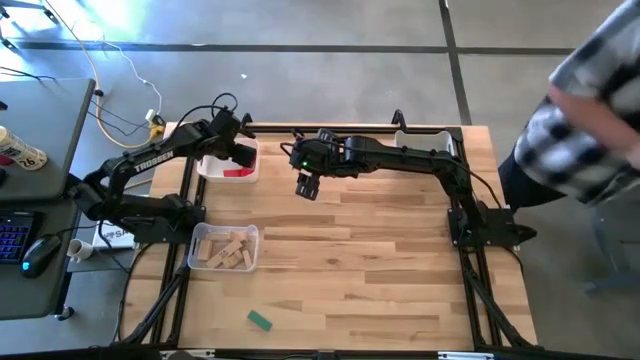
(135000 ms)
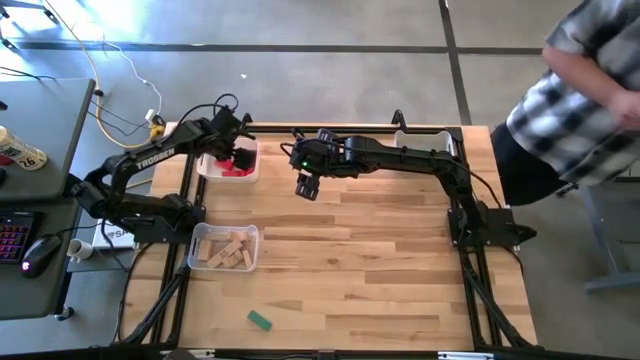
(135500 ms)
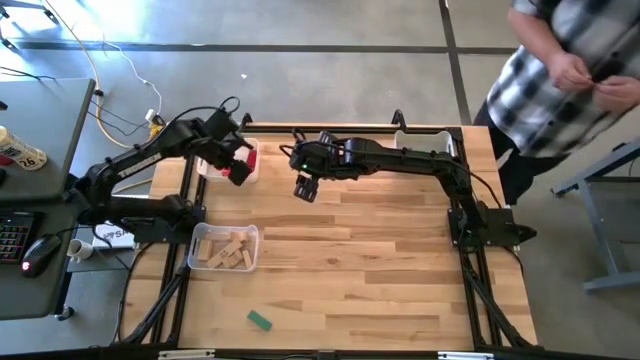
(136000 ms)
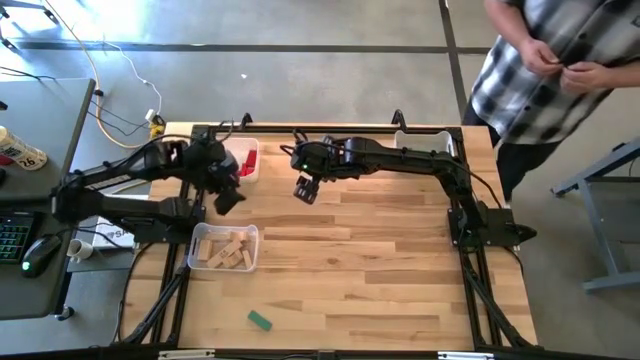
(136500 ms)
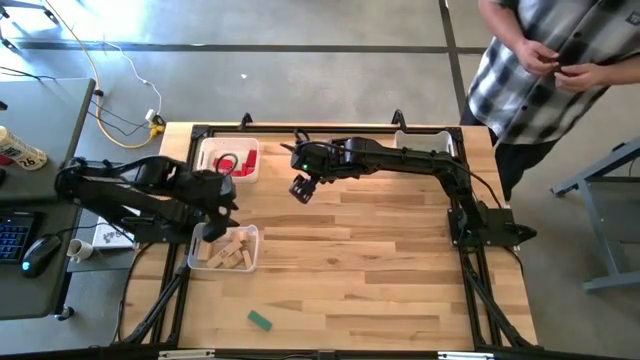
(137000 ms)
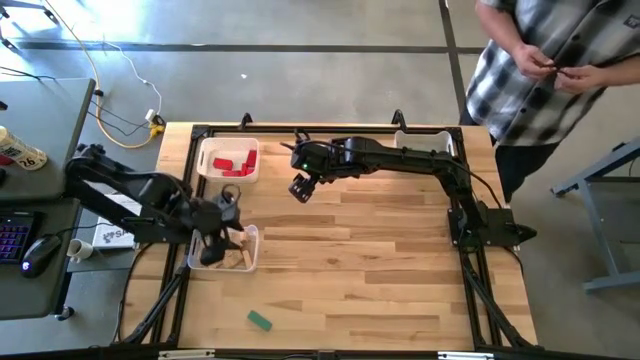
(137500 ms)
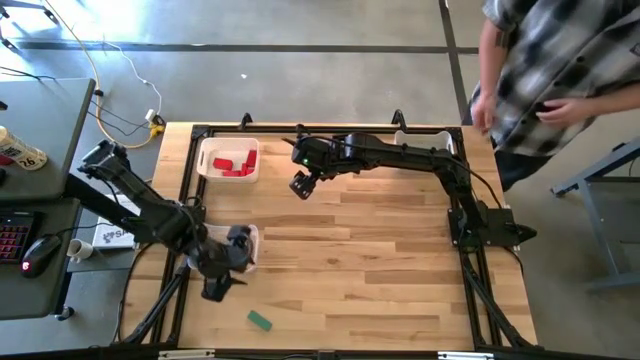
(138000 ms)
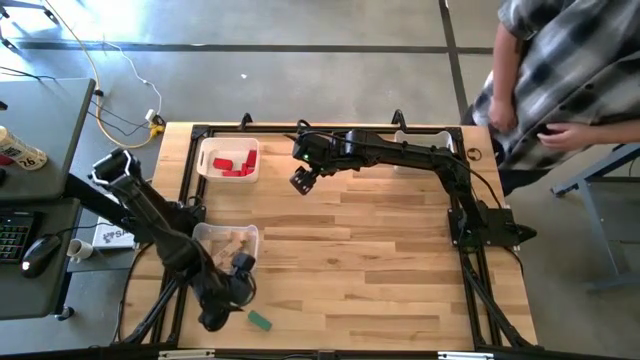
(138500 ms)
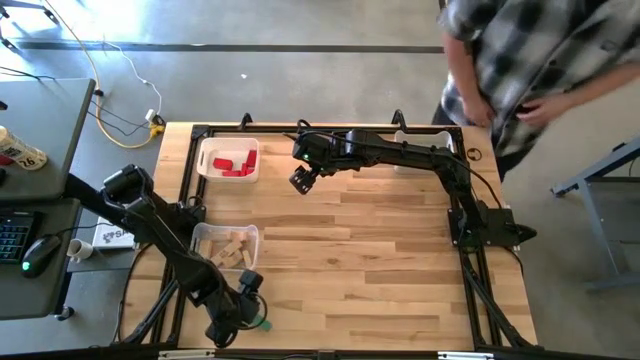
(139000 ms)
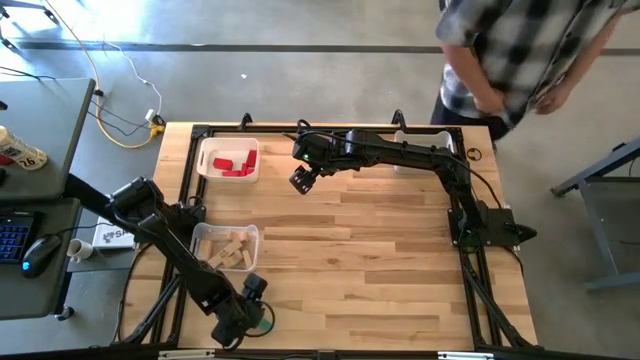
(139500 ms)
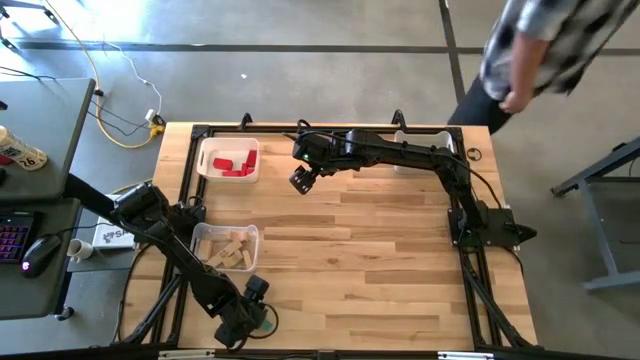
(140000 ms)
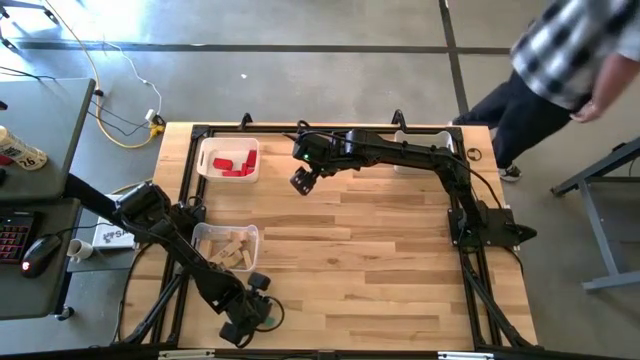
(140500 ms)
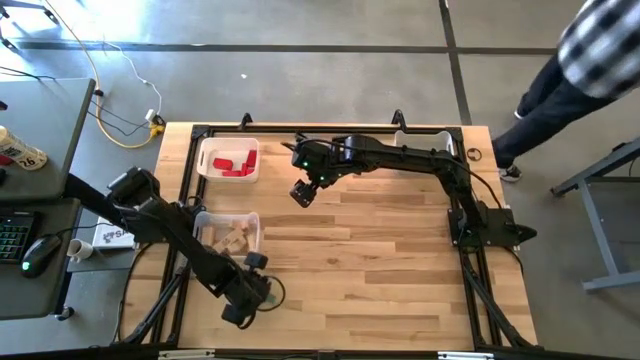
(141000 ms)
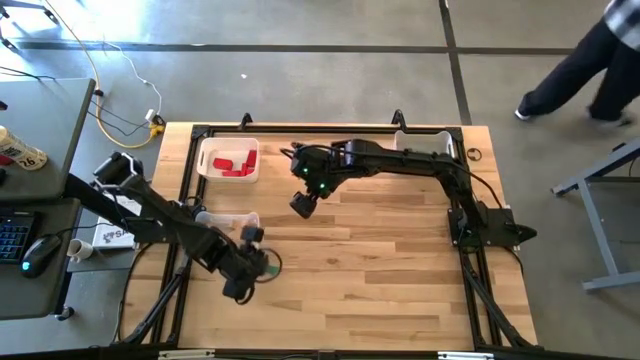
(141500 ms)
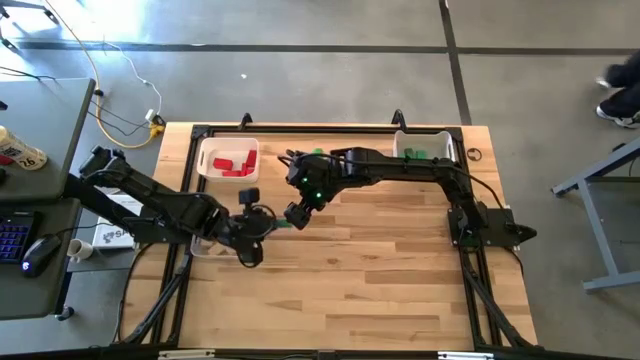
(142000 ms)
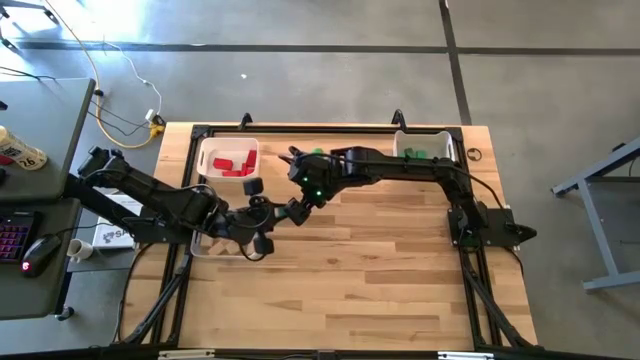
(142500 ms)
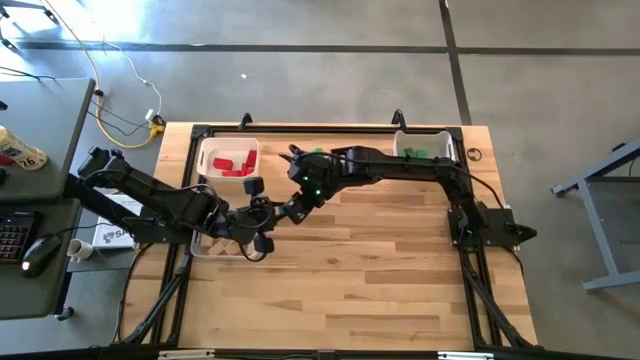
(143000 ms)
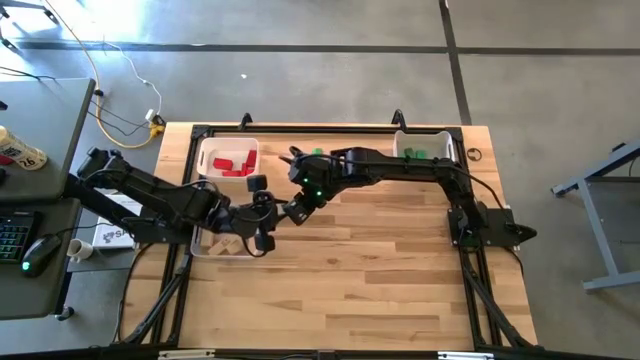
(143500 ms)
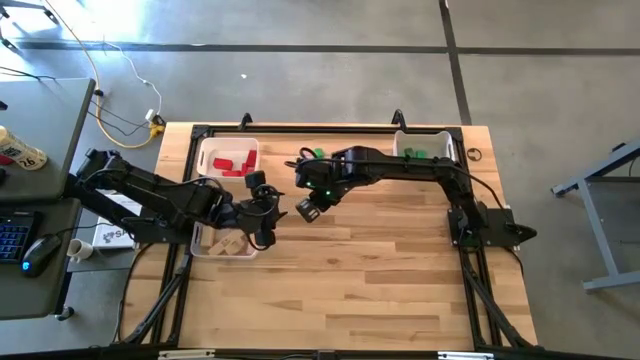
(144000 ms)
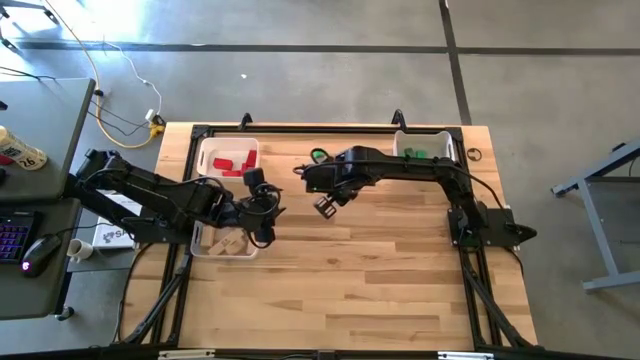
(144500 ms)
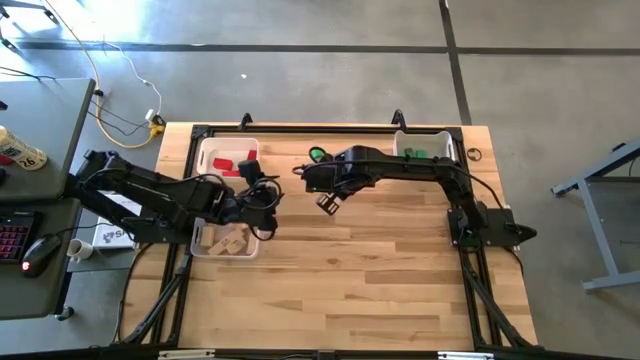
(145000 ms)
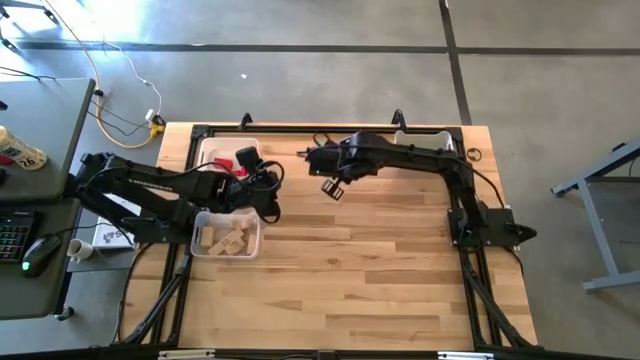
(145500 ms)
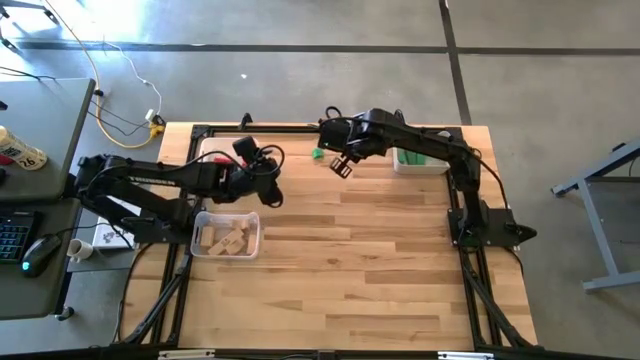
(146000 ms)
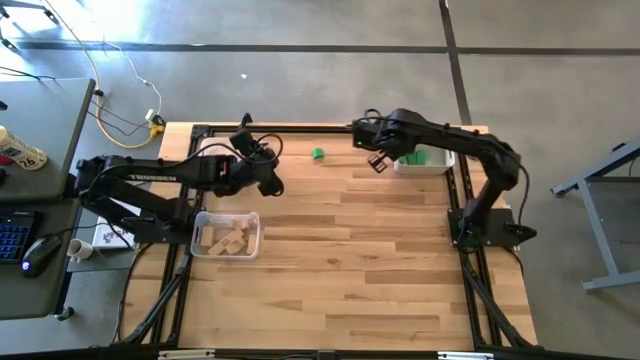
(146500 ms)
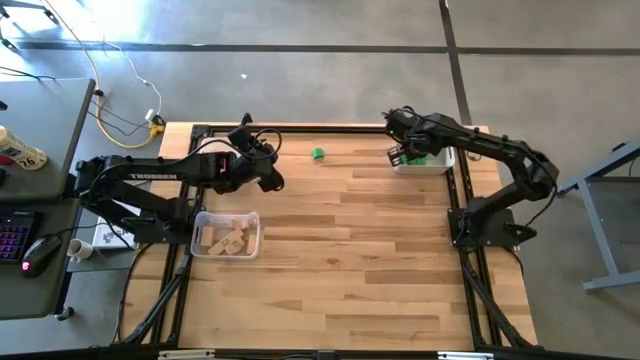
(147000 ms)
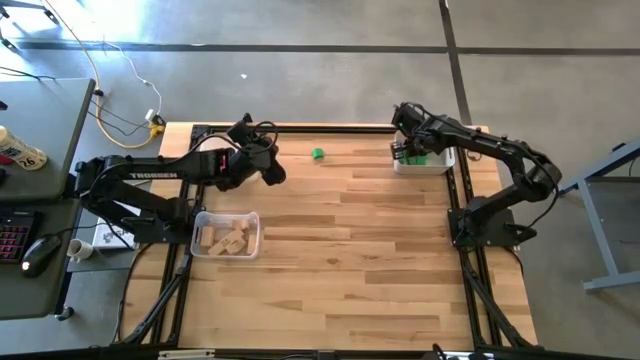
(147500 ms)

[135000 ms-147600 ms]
Task: Sort & place blocks by color
Put the green rectangle into the right white bin

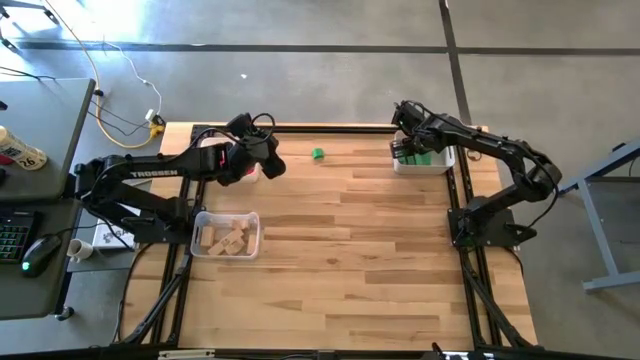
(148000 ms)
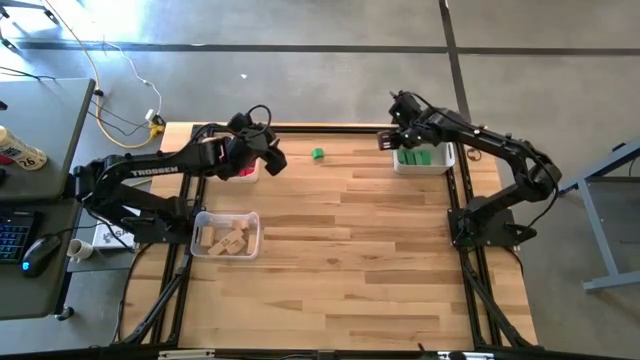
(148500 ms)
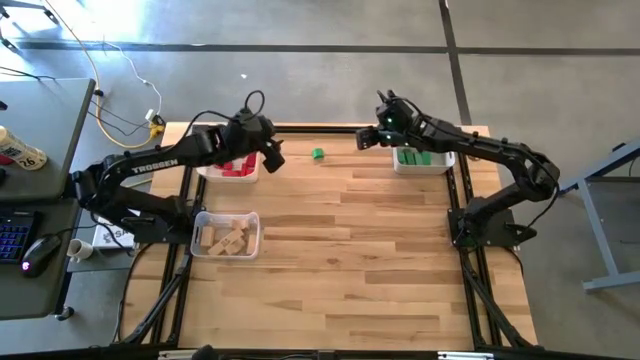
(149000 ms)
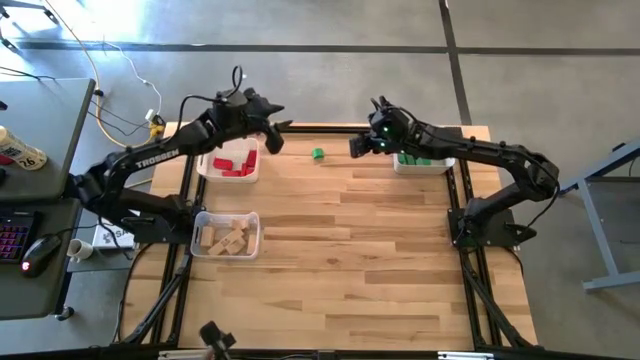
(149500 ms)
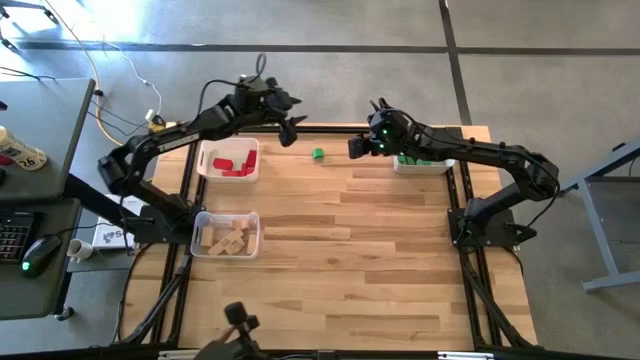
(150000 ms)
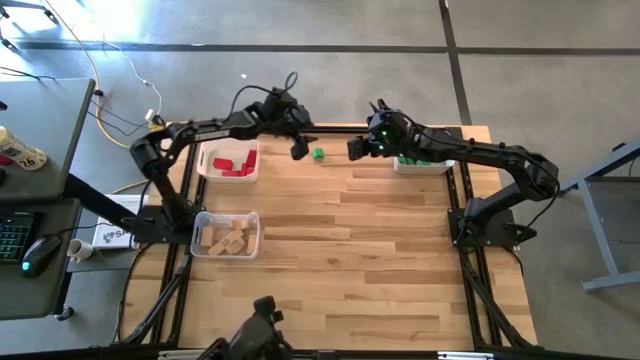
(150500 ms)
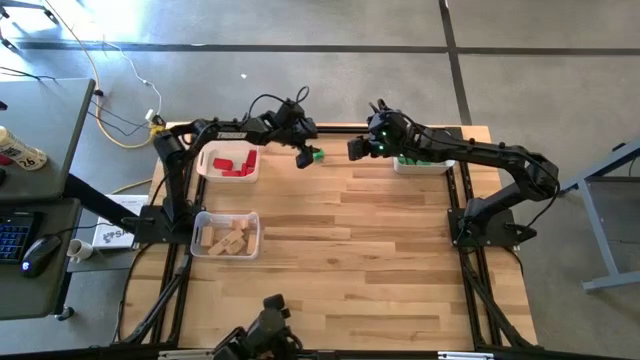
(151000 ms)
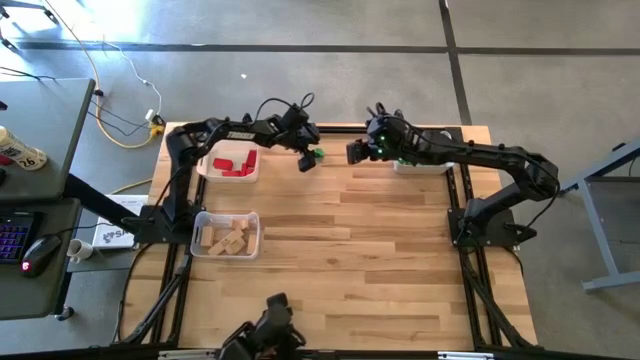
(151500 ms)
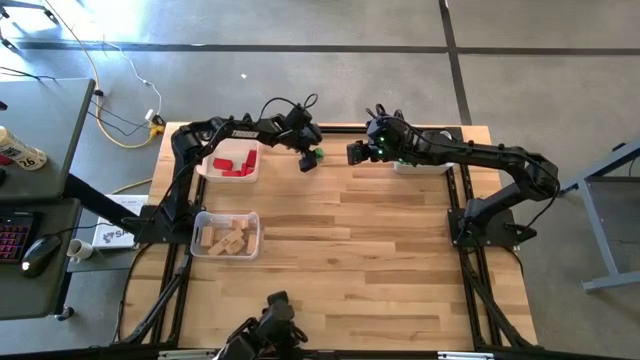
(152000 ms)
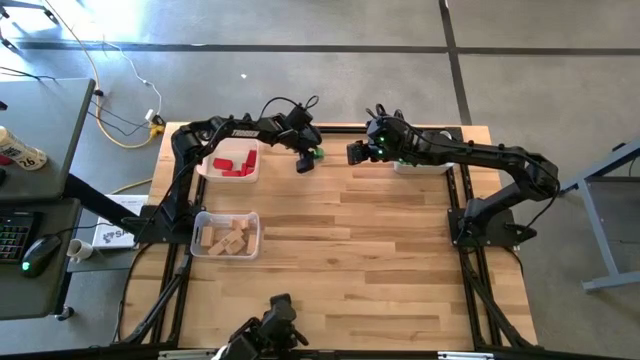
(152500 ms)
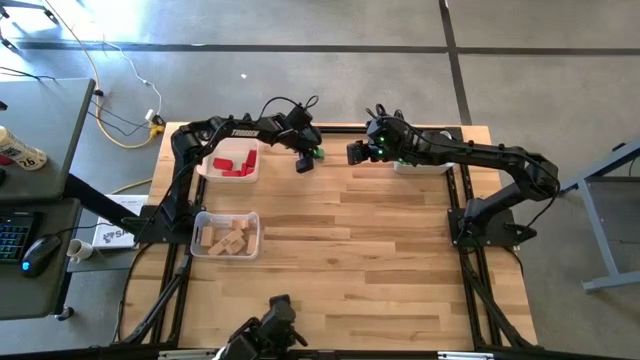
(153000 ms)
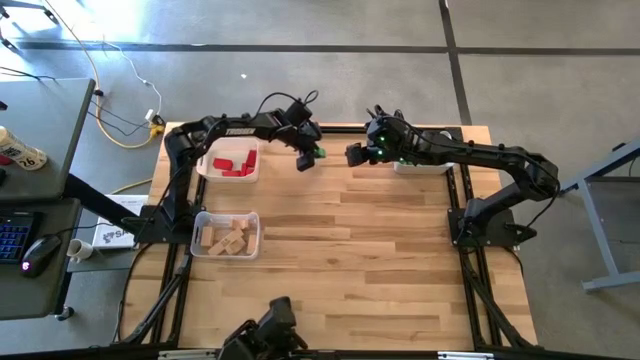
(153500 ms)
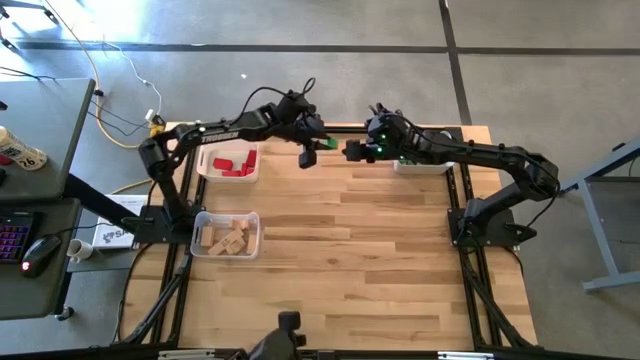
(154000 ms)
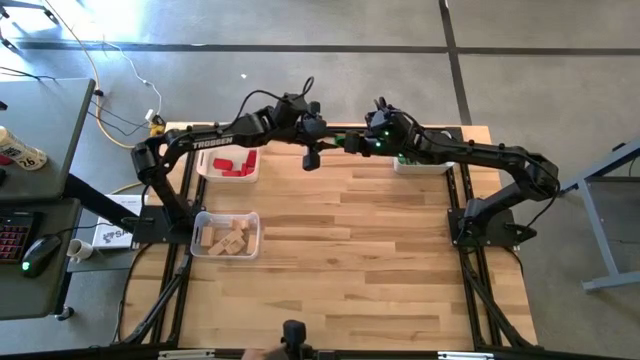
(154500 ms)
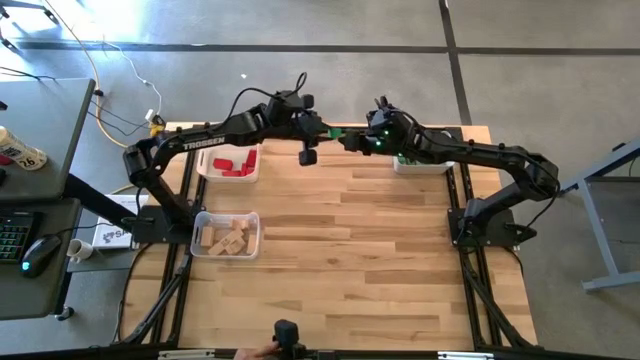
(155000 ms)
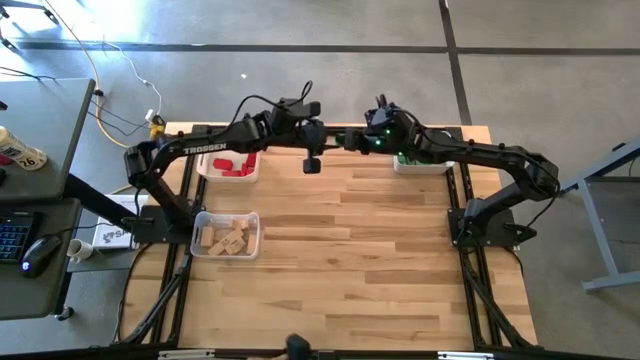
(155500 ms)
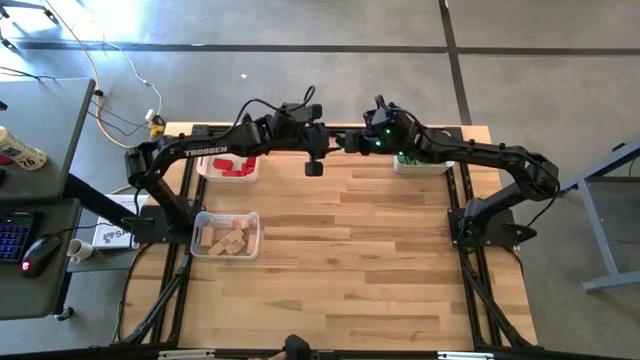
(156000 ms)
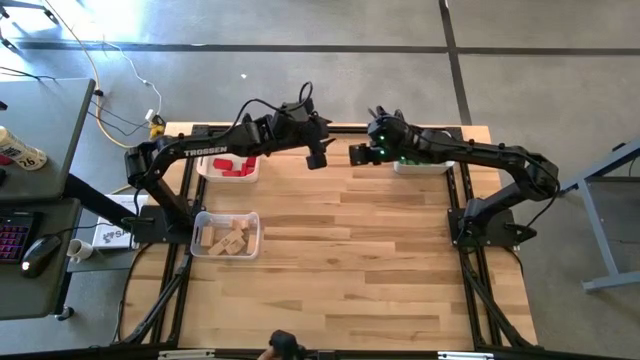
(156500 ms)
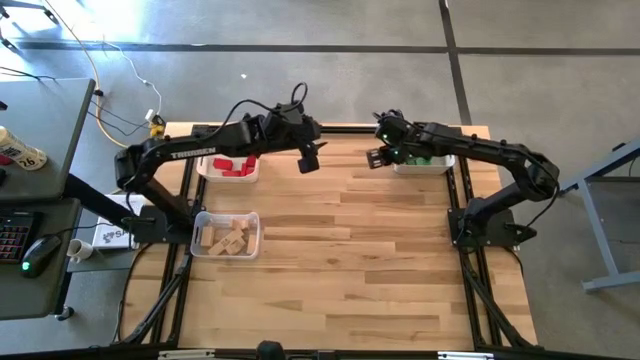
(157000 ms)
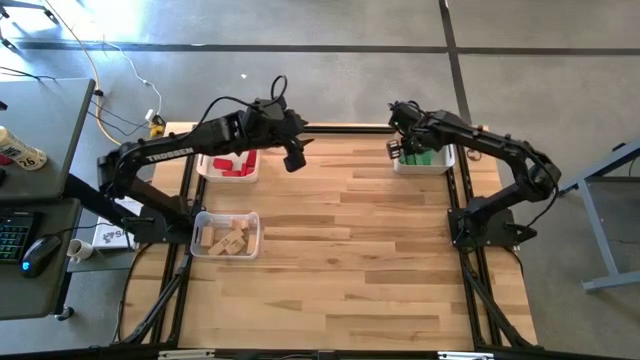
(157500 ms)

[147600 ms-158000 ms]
Put the green half-circle into the right white bin
